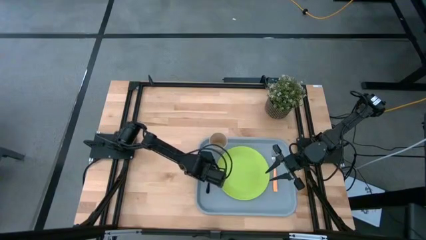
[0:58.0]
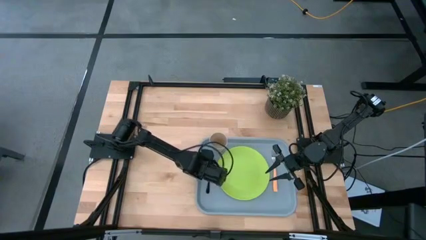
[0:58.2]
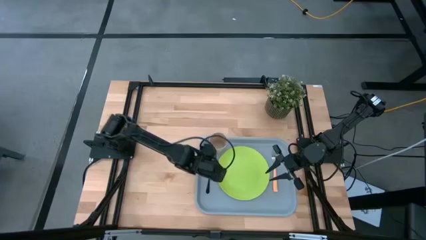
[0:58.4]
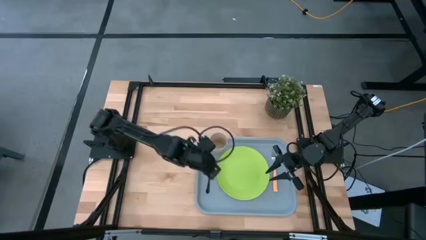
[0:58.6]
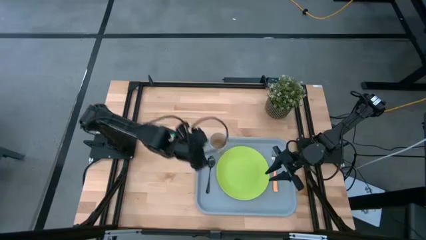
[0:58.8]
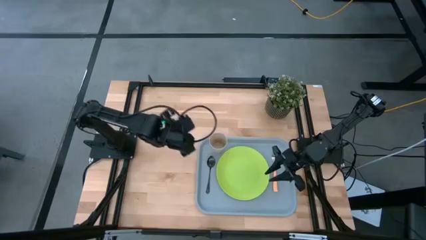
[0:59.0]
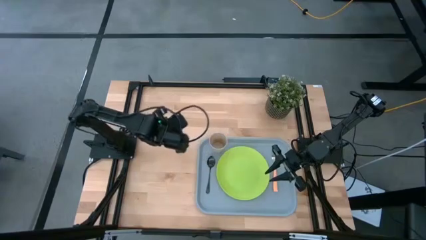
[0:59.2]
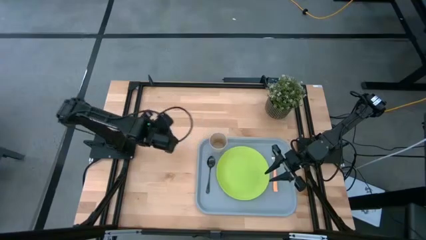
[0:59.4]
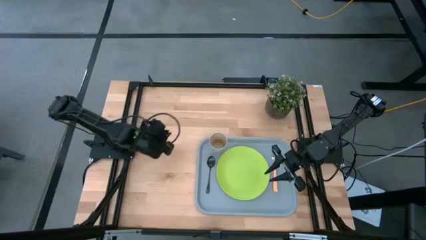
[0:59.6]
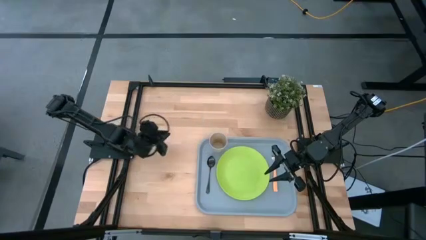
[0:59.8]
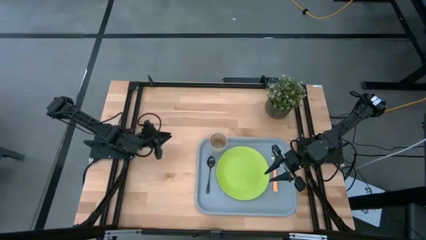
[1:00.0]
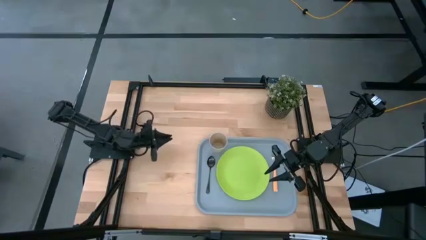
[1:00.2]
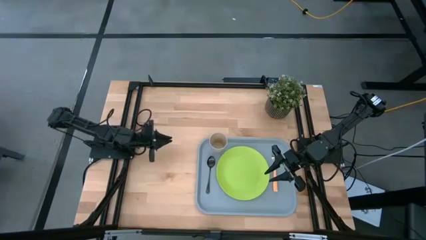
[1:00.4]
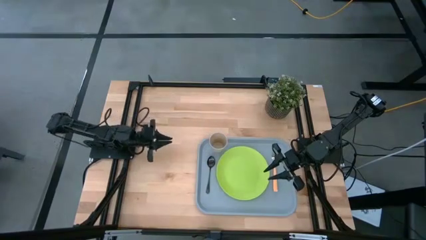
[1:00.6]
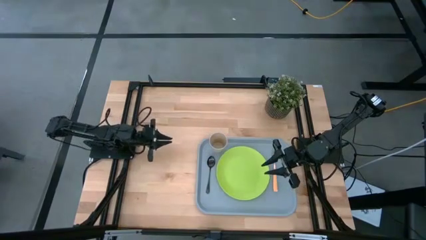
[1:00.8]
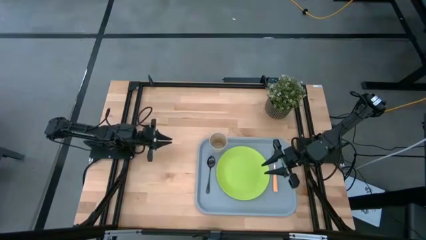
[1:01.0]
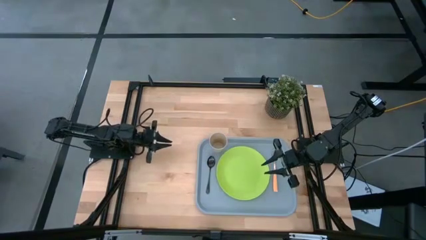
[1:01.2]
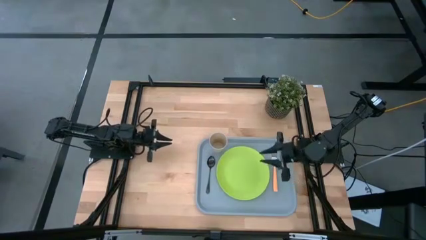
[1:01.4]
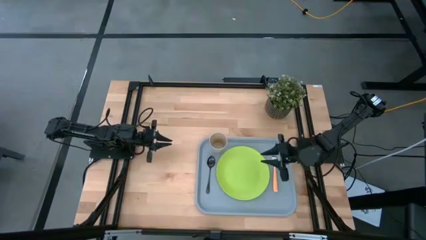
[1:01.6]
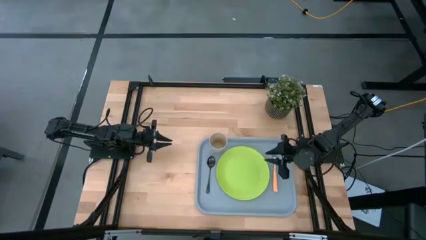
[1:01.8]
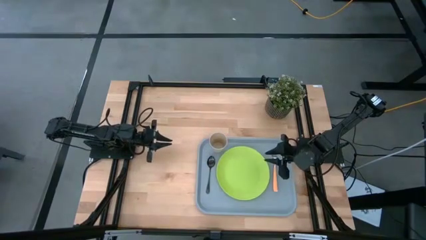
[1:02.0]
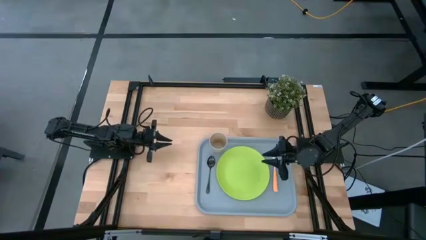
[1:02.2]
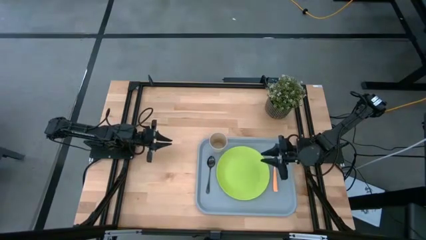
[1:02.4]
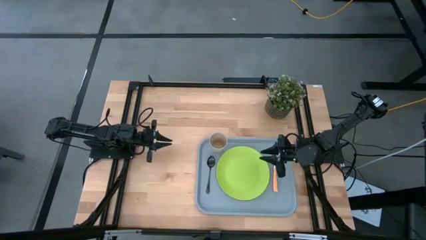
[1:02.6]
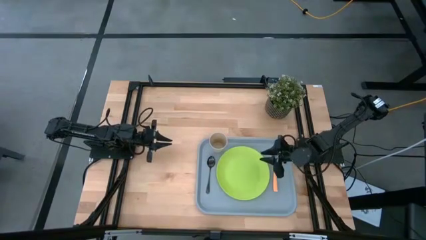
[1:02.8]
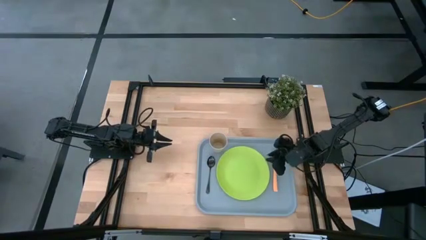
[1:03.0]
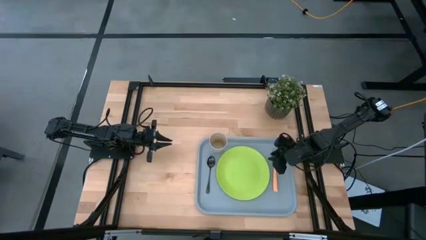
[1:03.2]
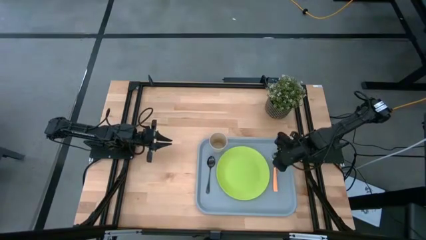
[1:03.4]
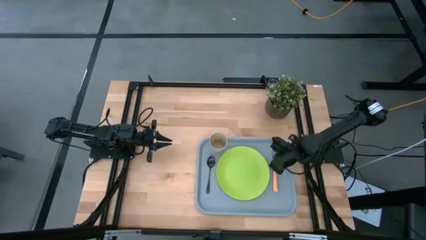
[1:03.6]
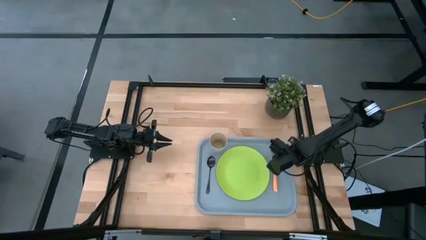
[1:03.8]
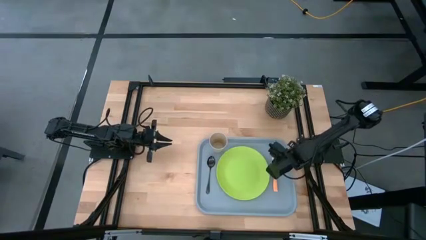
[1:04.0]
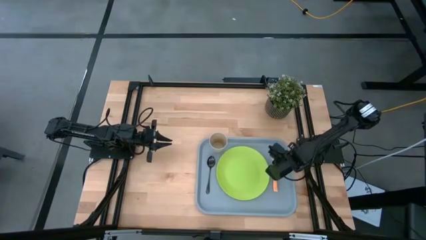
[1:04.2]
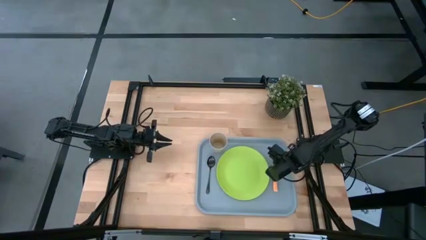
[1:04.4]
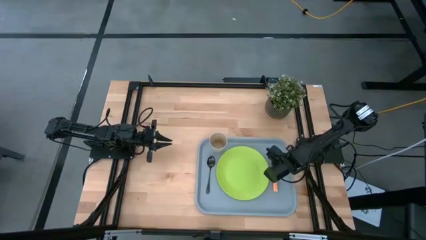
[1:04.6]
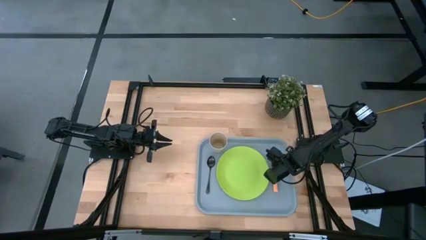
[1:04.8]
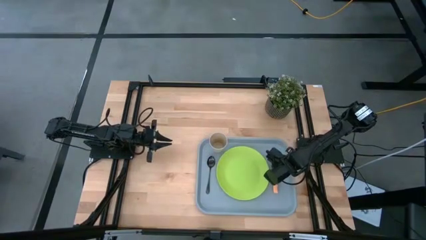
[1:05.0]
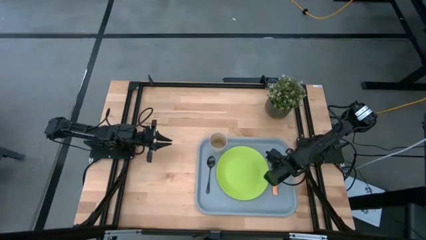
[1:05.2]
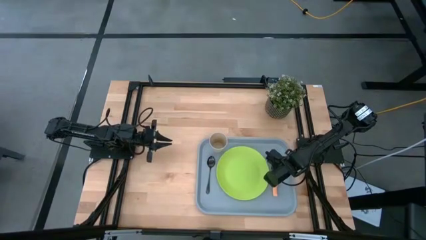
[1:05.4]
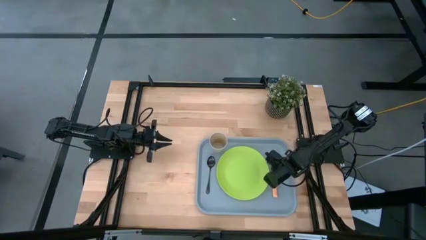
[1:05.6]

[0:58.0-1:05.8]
Task: Pick and place plate/cup/fork/spoon on tray
Adjust the orange fork on the gray tray

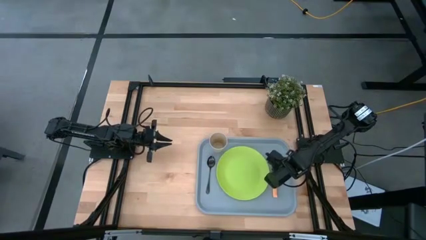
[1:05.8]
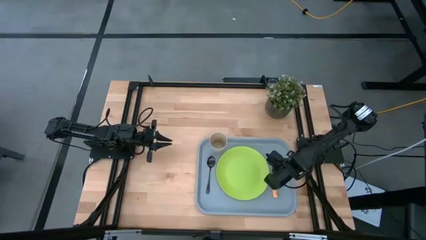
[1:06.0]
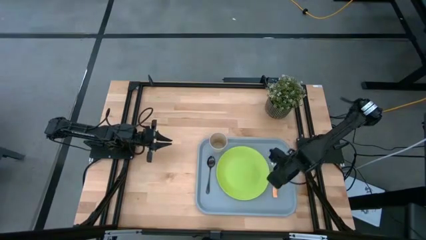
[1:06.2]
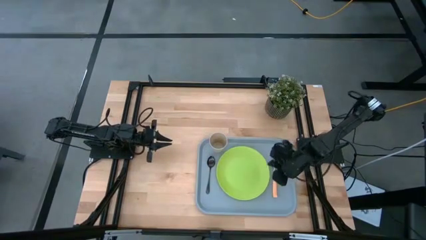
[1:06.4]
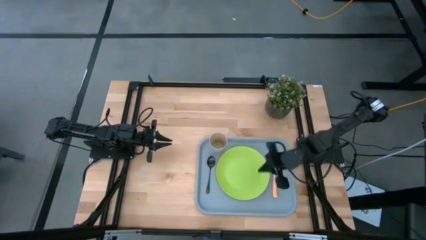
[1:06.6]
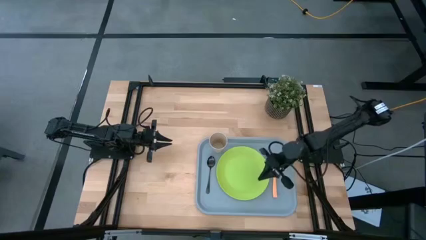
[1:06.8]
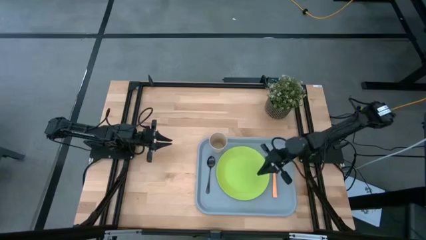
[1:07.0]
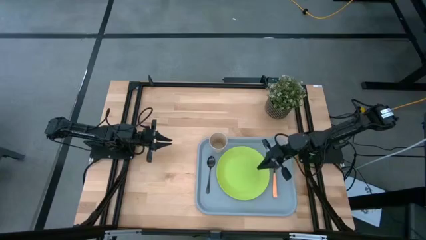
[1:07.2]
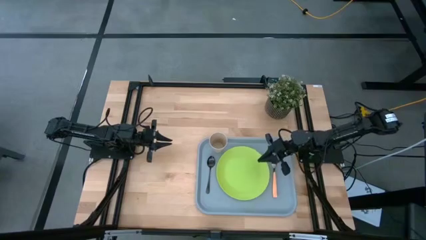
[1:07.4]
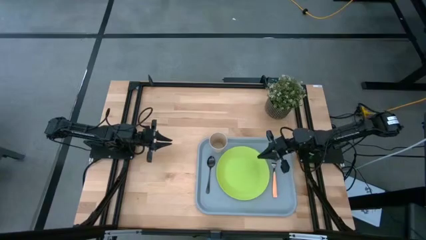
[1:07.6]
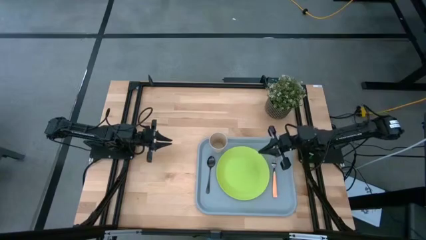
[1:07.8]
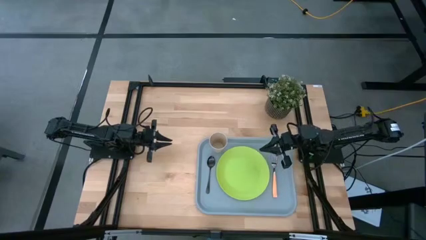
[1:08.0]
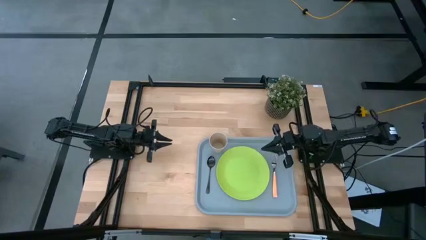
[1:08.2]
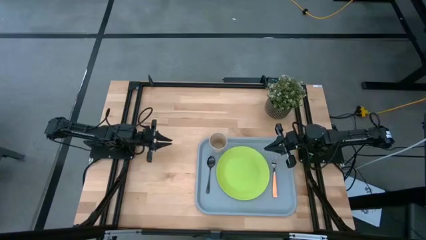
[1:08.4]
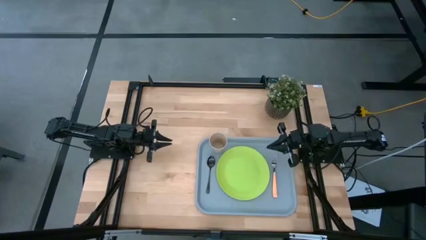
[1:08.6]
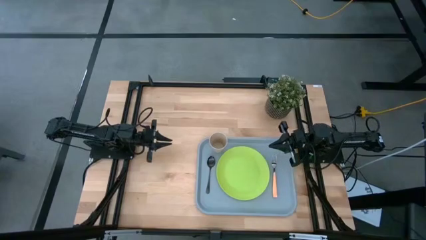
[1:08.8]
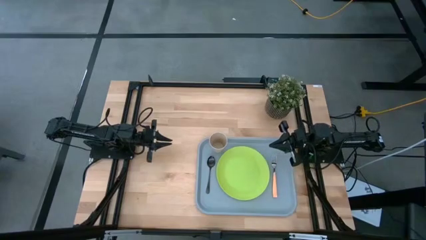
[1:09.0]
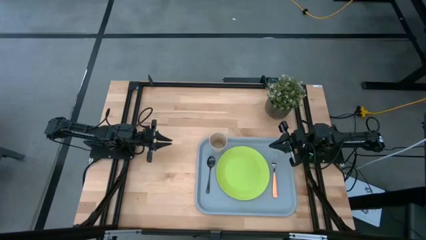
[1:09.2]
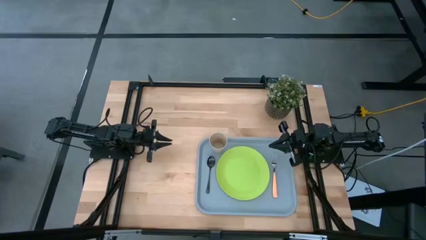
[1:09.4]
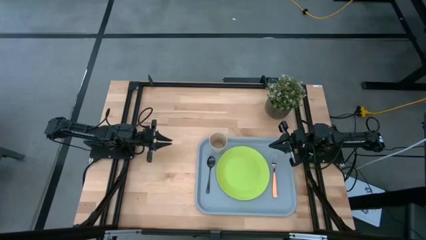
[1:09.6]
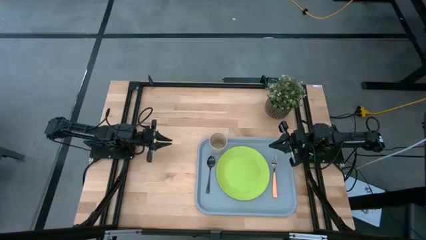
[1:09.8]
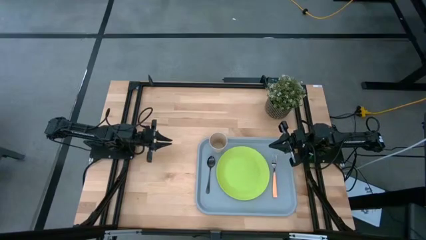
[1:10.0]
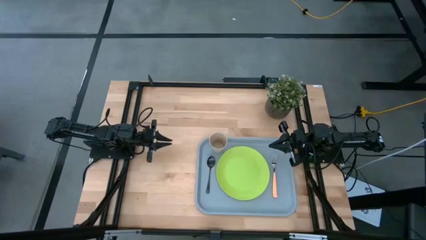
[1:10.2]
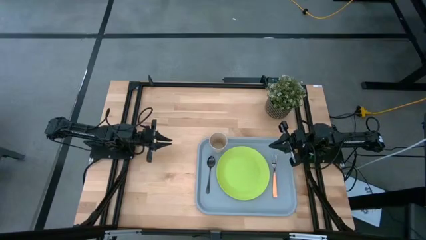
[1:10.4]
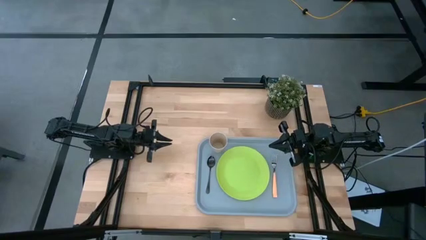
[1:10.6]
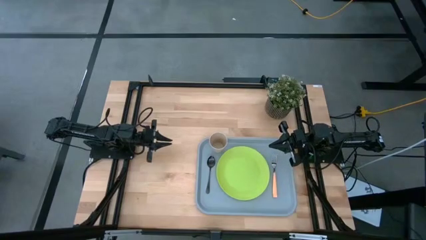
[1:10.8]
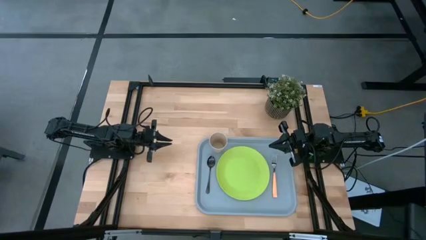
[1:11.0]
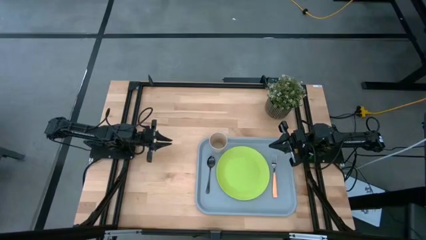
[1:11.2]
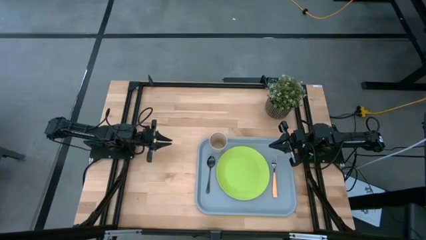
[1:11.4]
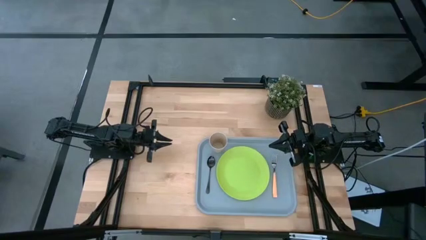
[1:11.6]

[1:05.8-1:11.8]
Return to Home Position

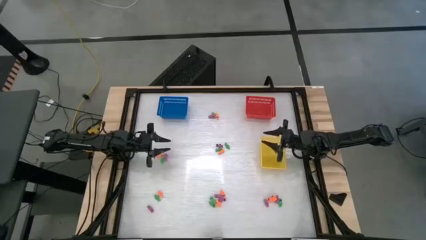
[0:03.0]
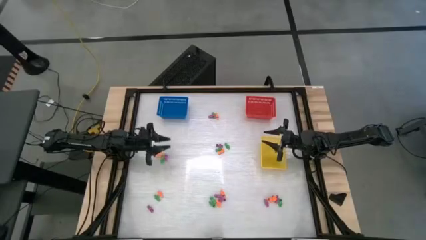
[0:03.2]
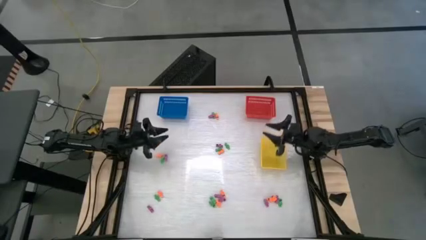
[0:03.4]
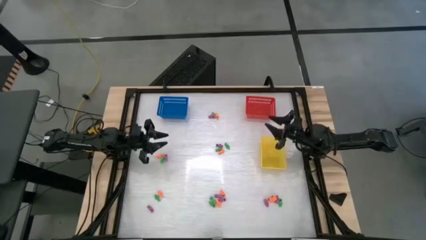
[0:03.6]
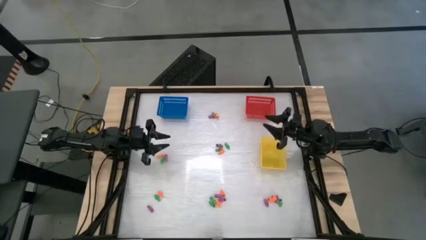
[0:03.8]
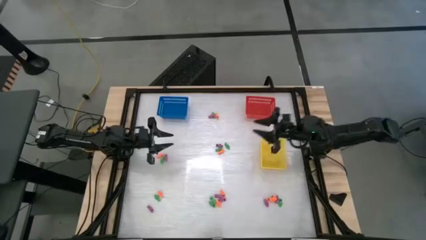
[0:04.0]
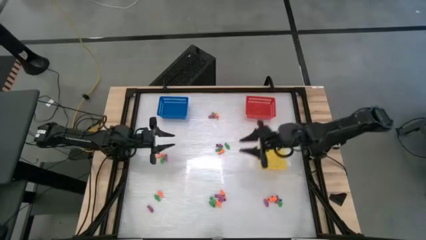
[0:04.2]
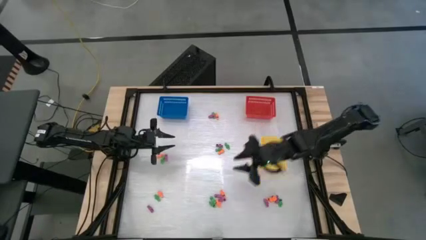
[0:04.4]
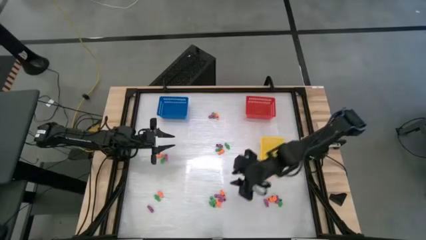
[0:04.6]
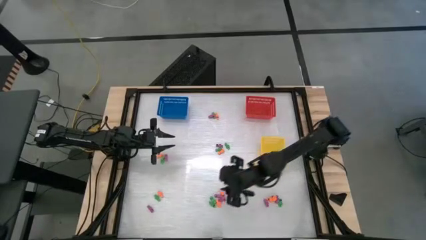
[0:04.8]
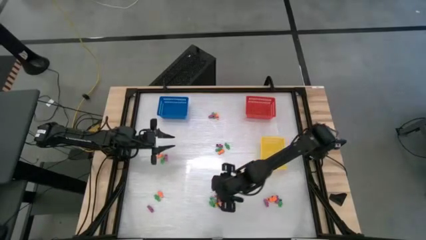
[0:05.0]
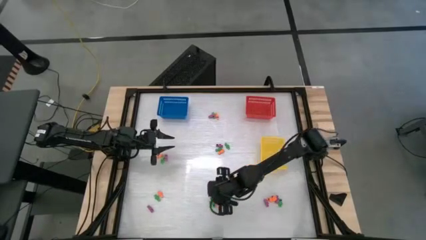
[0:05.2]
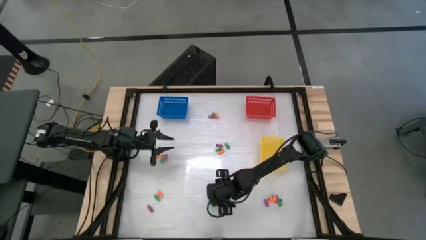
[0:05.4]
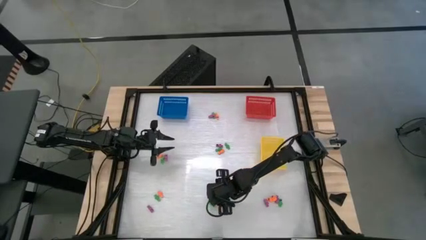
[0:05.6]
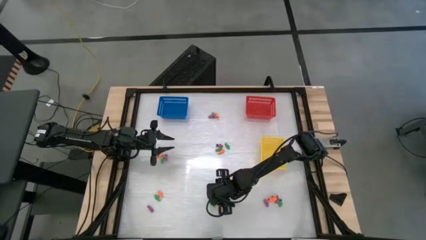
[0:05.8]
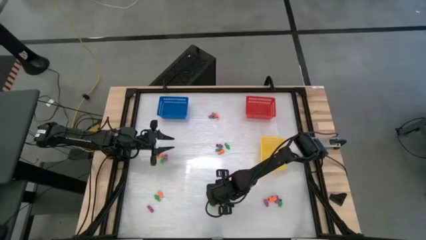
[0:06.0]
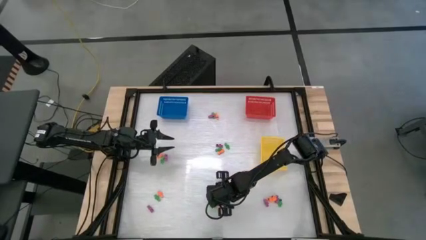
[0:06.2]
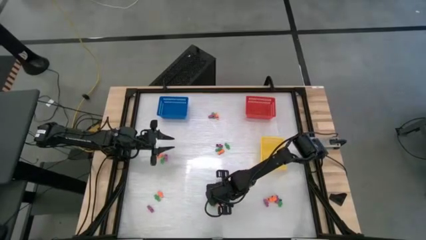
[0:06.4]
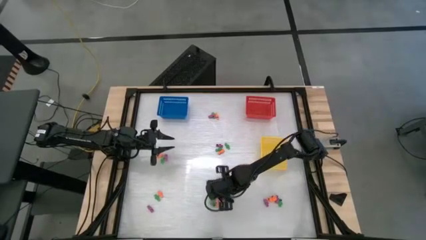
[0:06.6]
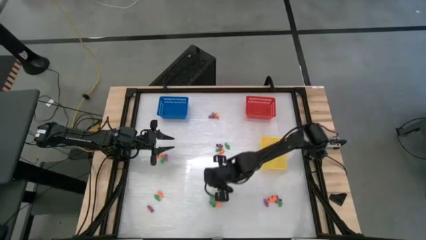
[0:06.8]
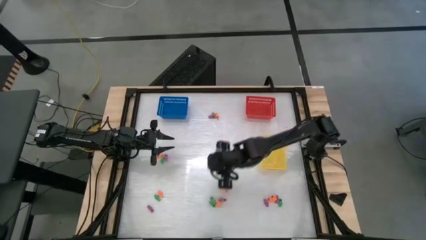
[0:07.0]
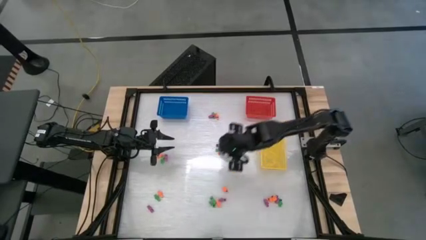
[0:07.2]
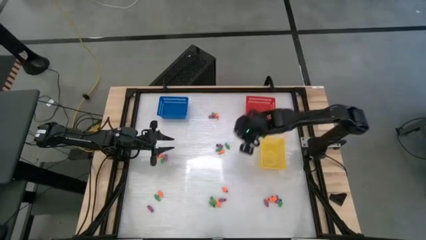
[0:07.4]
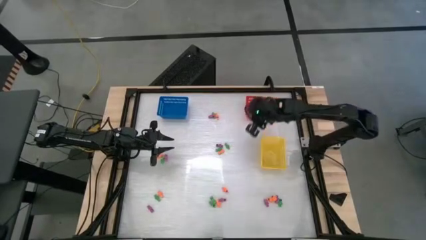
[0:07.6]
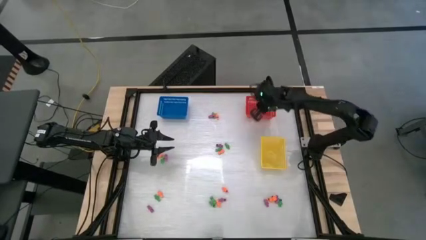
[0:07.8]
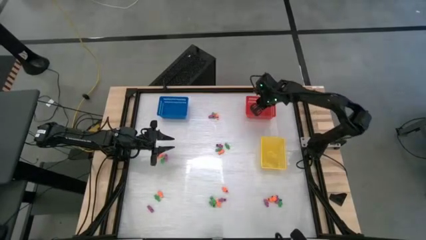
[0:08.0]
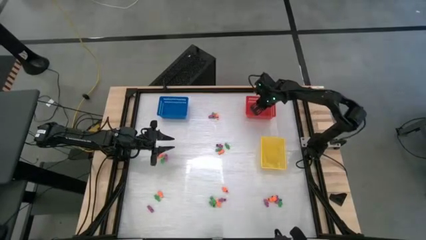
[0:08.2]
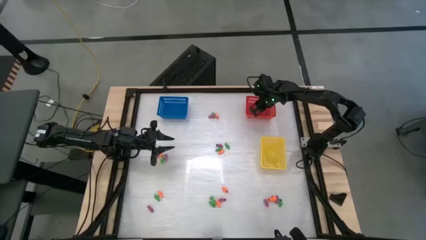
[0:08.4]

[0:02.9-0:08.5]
Task: Sort Halloween decoration
Put the purple skeleton toy into the red bin
